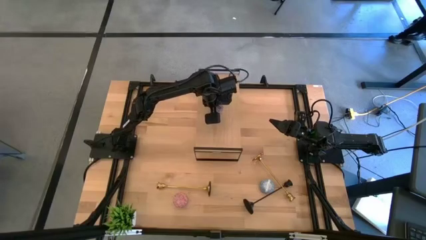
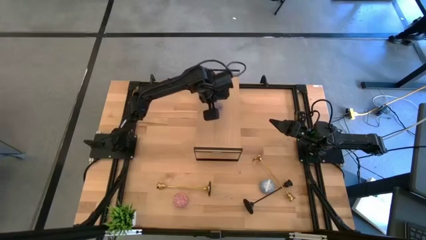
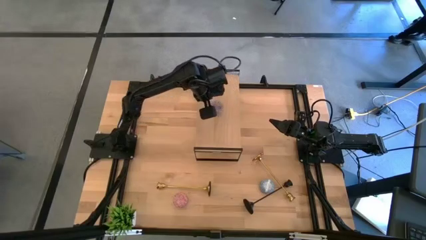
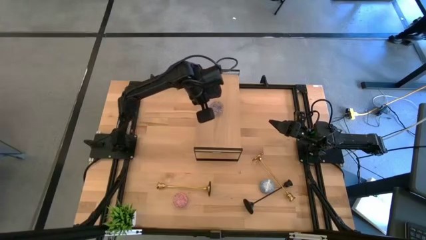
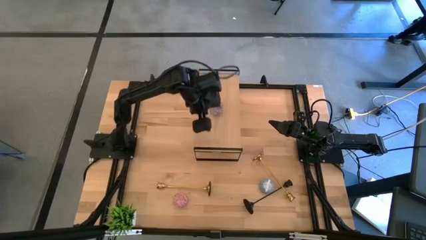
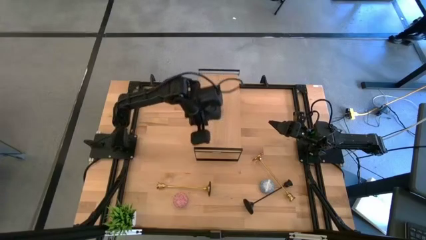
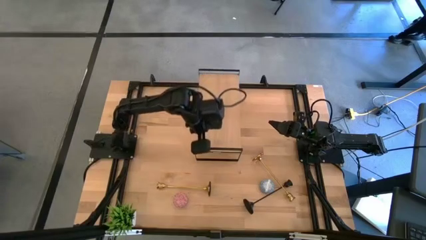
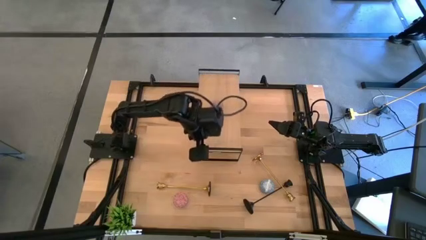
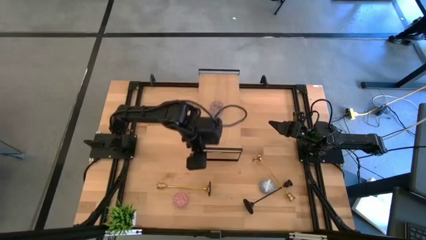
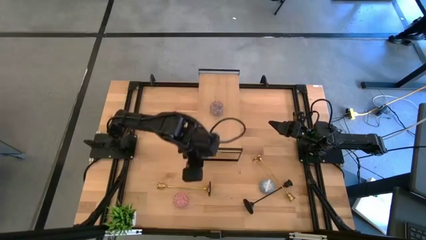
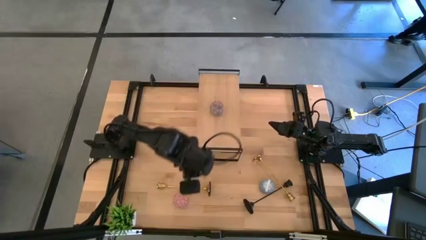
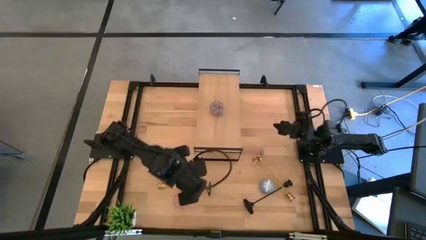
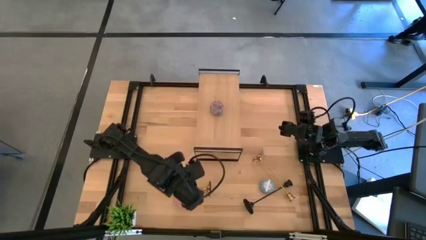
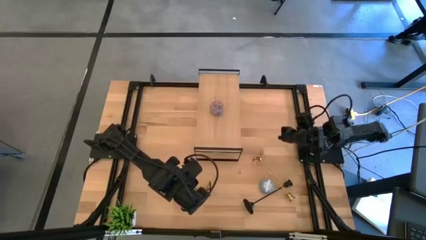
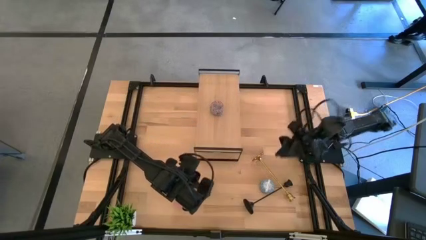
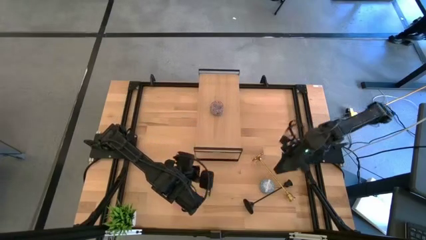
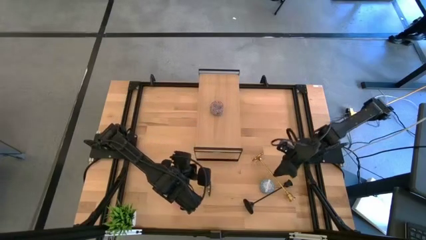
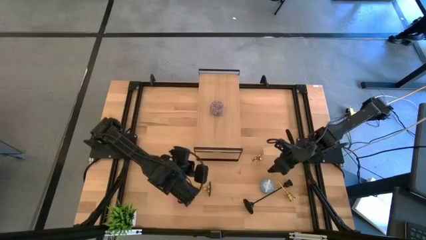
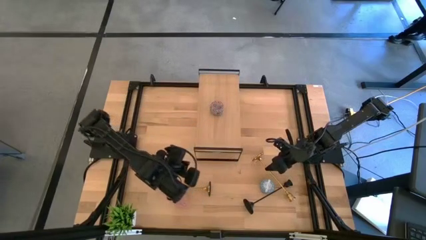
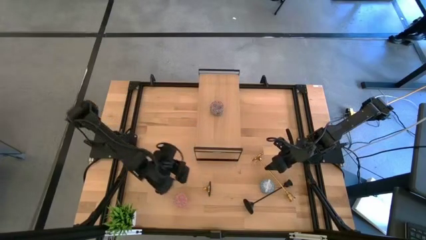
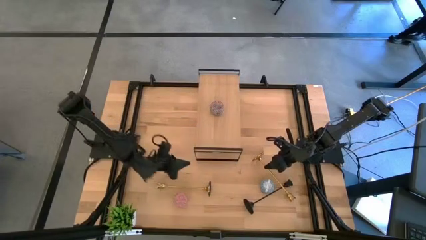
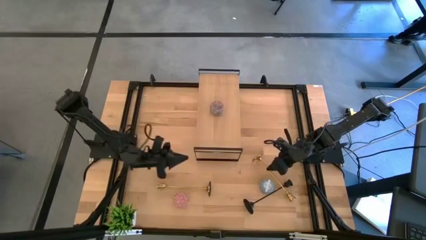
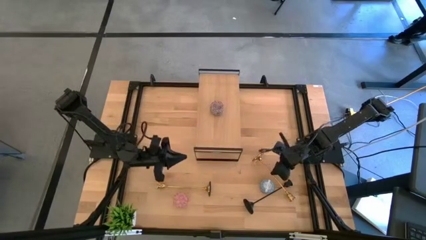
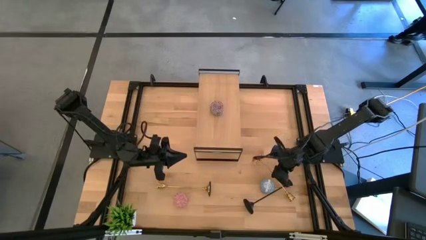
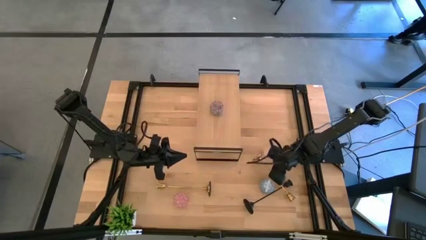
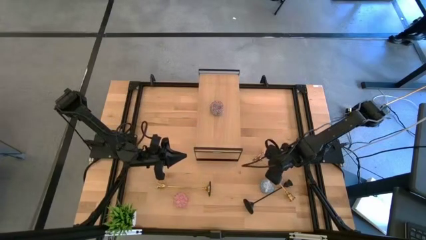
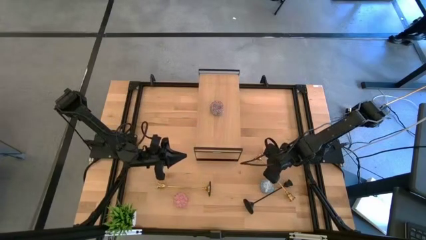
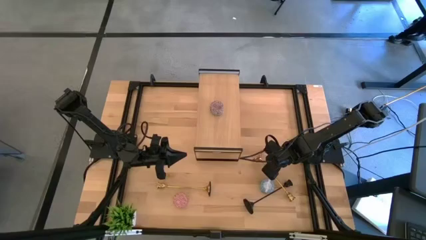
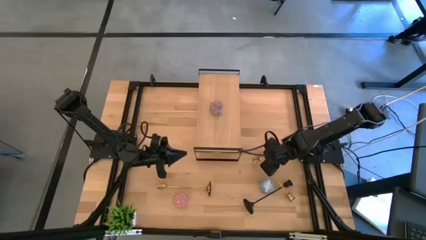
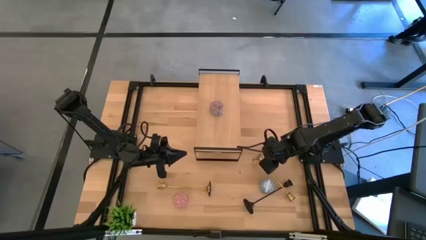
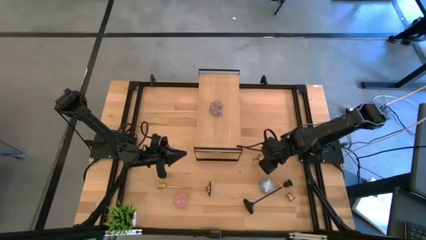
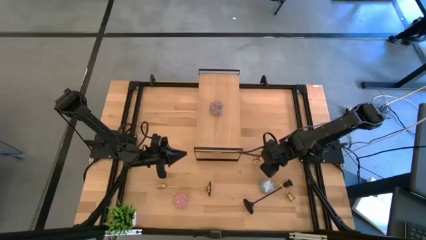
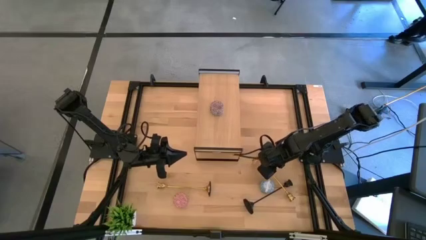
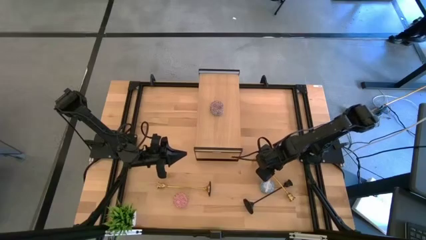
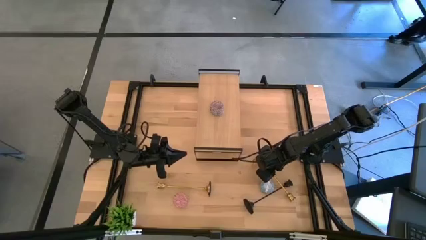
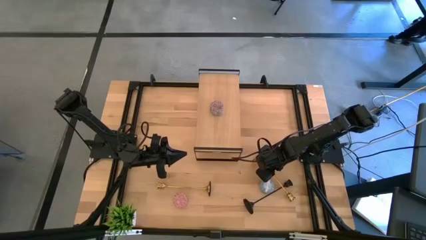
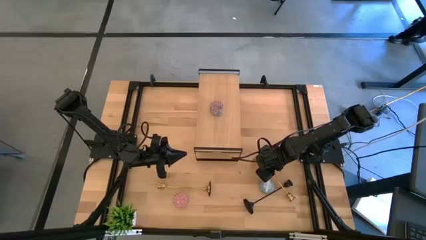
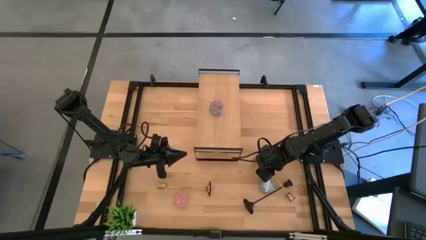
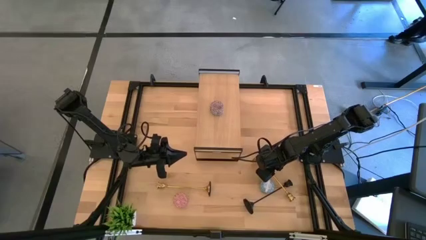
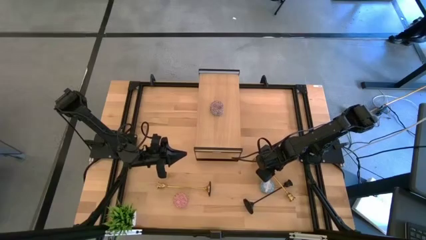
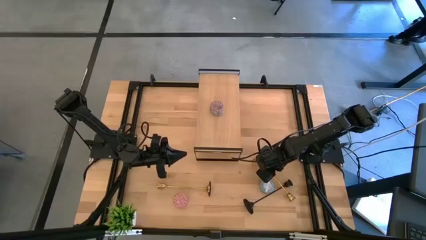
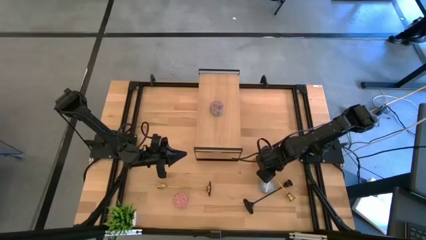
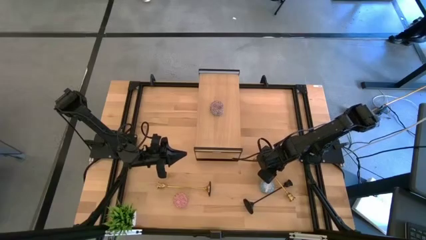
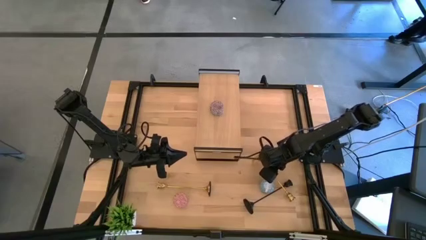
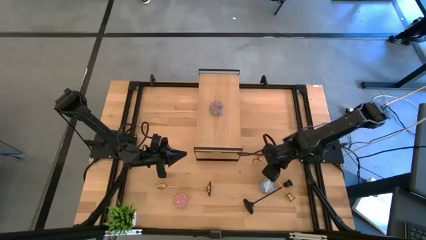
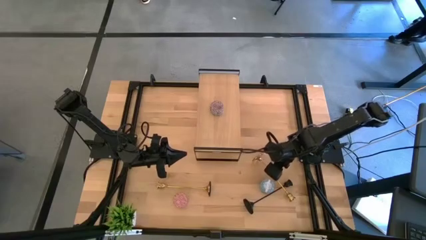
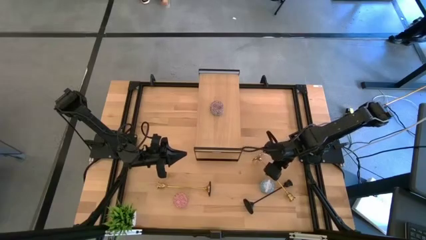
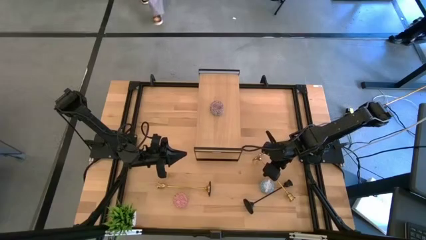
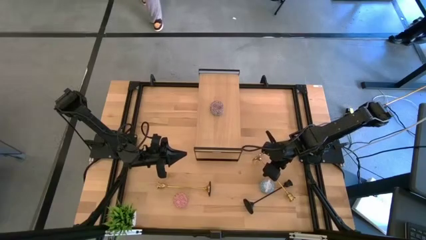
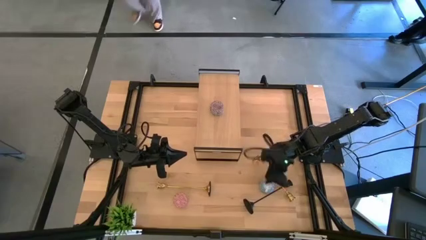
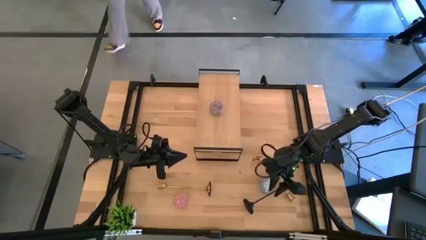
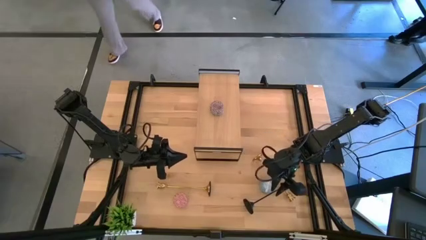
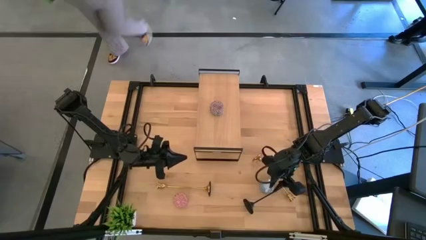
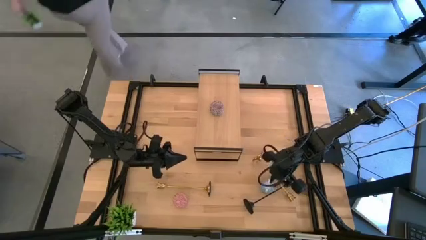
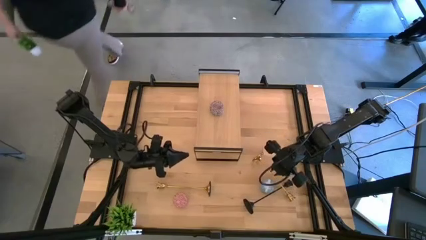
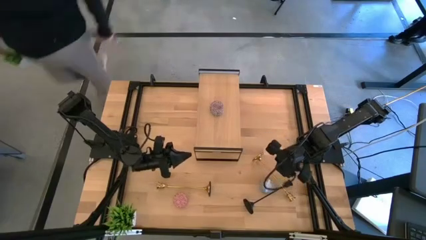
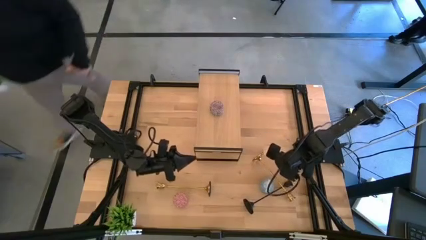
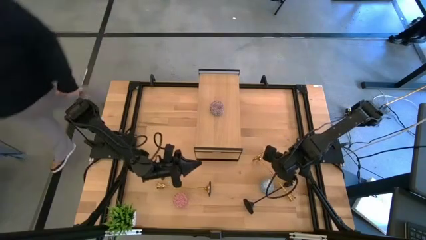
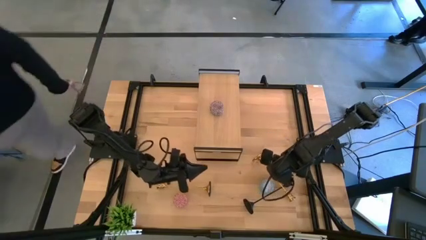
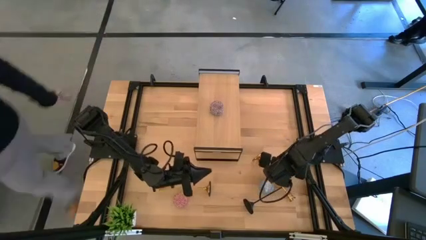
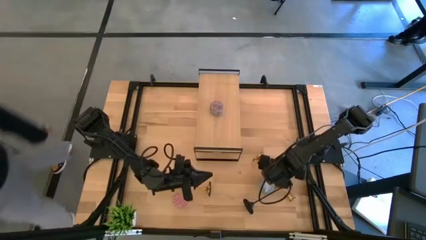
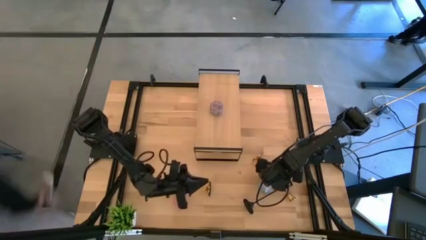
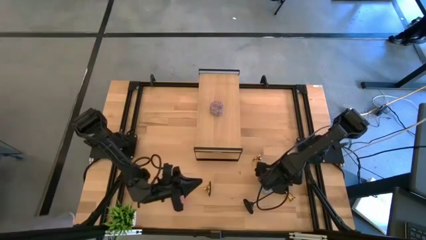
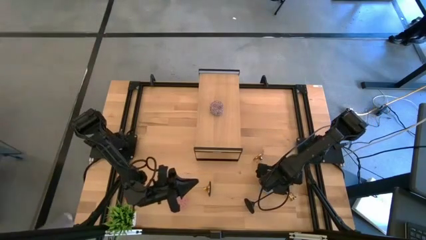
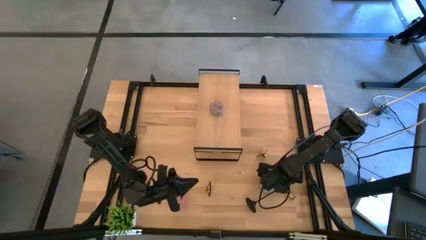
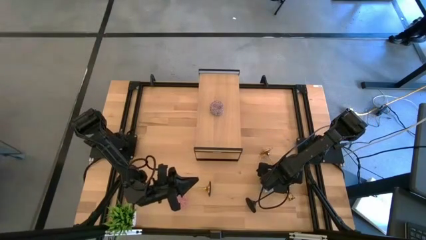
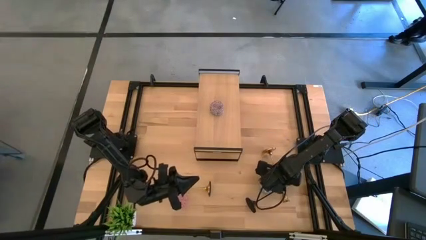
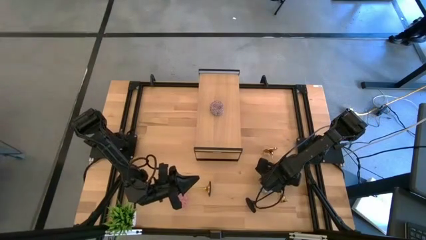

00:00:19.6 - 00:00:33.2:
Task: Pick & Place candle stick holders
Put the left gold candle holder on the shelf
